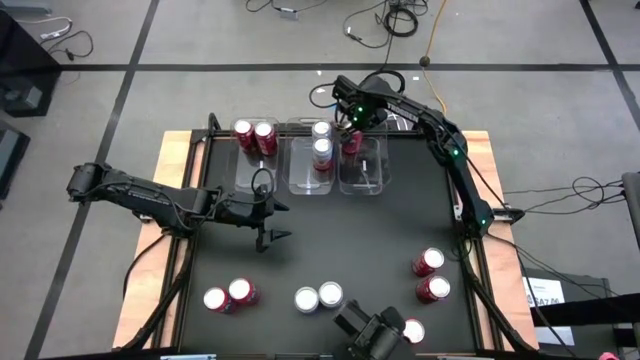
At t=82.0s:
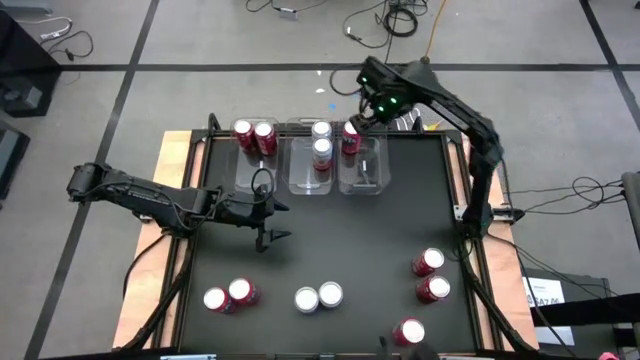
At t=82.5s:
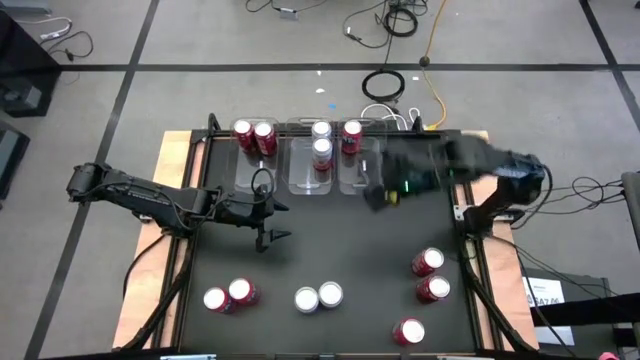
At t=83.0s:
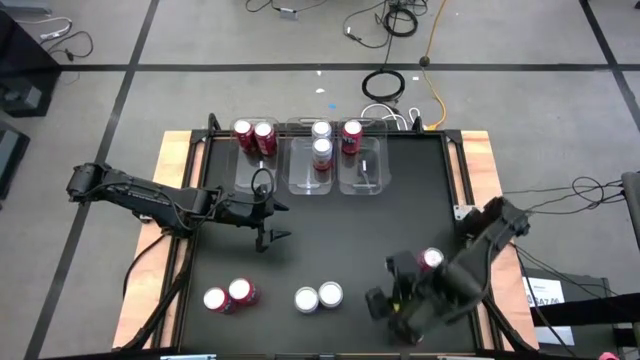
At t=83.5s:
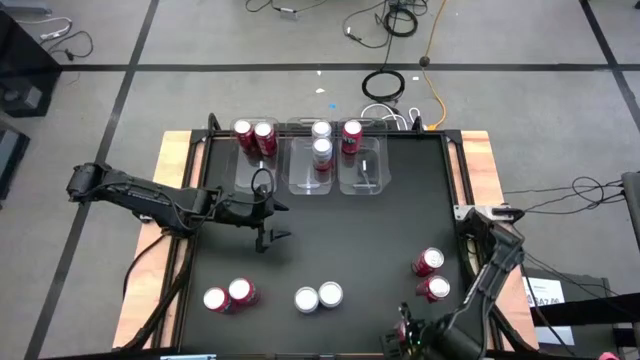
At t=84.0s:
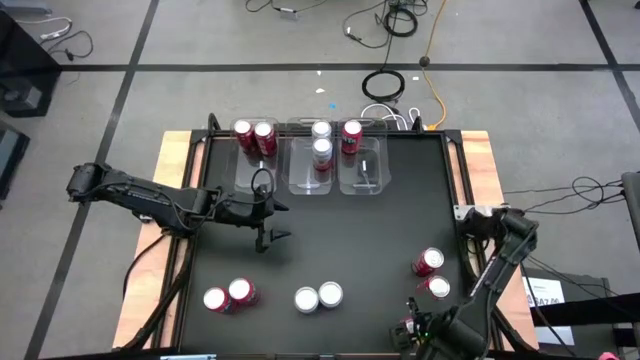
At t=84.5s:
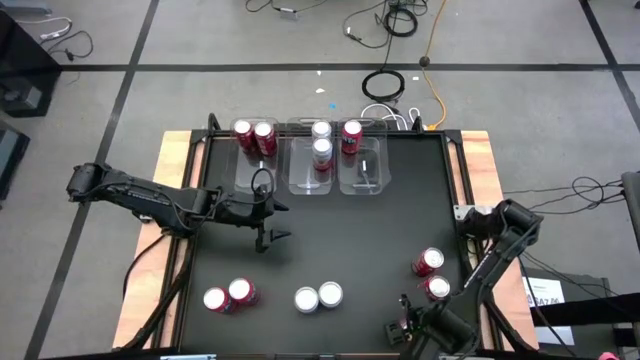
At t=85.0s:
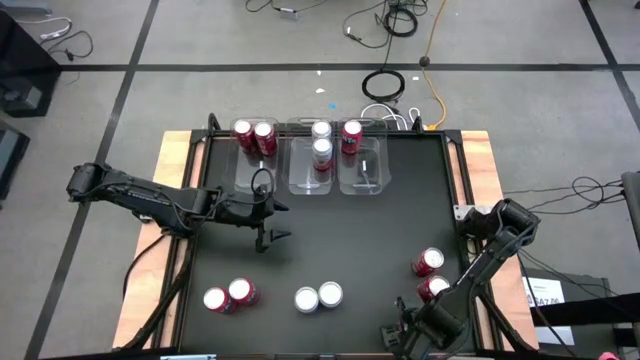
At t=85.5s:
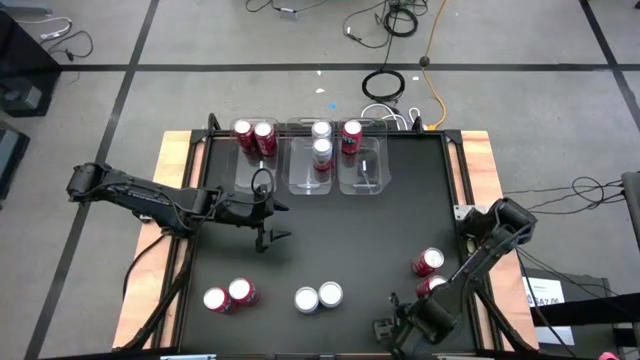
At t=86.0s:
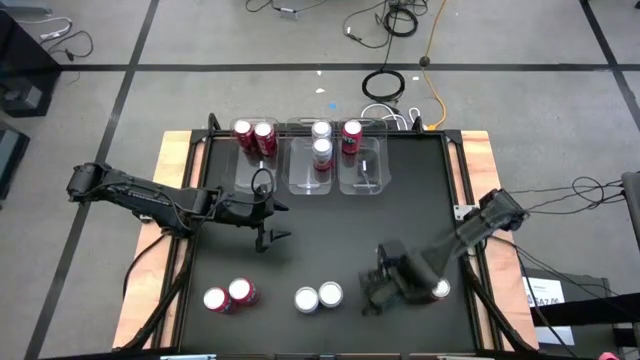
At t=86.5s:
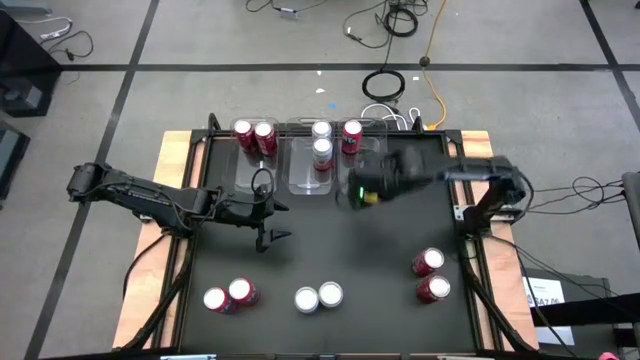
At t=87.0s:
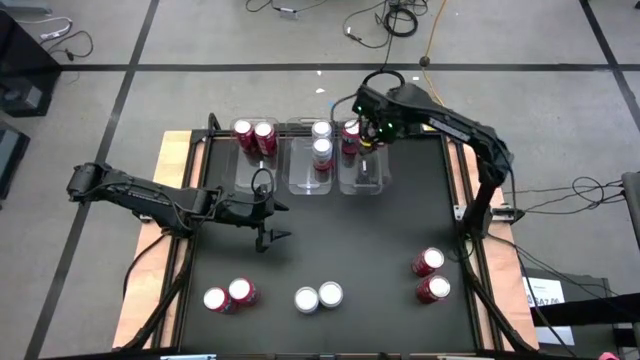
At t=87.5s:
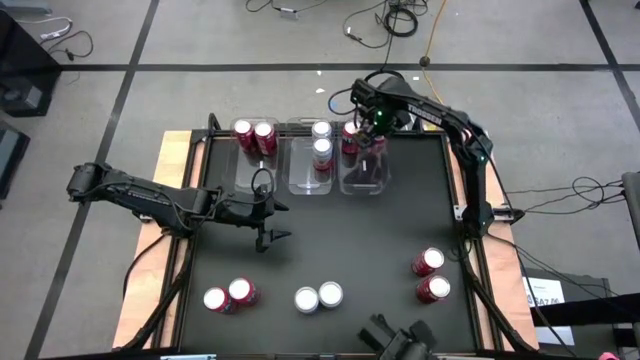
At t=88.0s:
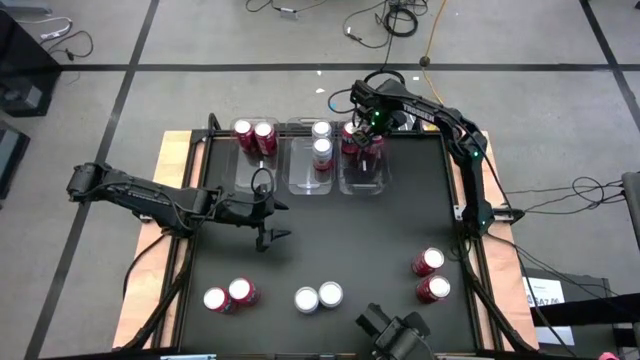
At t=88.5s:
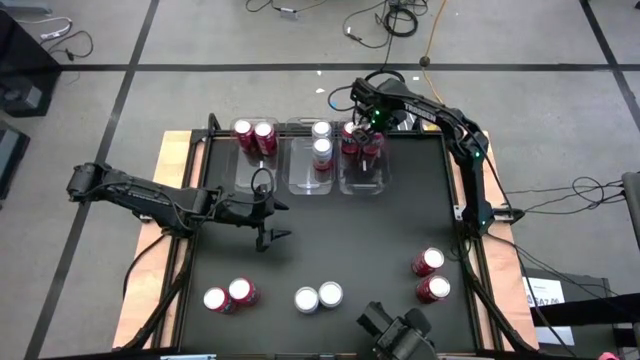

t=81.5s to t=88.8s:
Task: Sort soda cans
Put the right orange soda can into the right transparent bin

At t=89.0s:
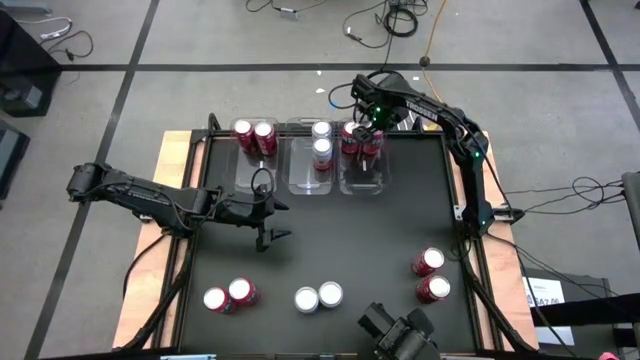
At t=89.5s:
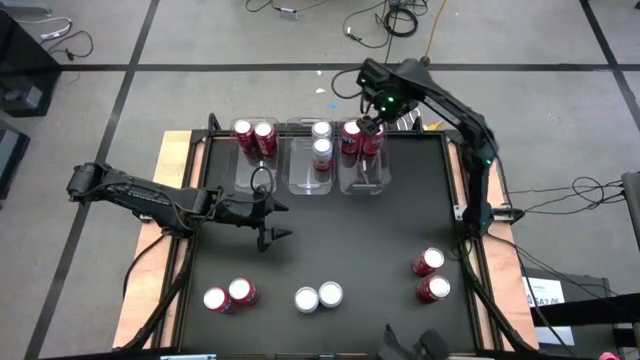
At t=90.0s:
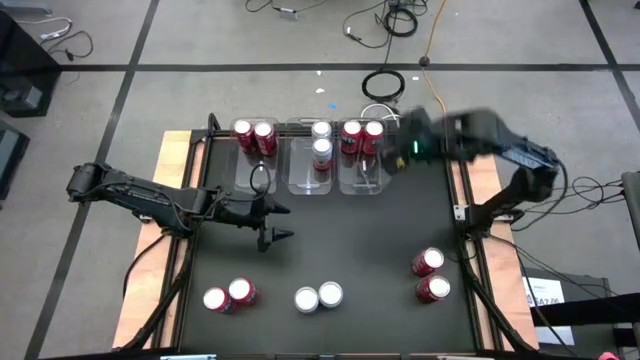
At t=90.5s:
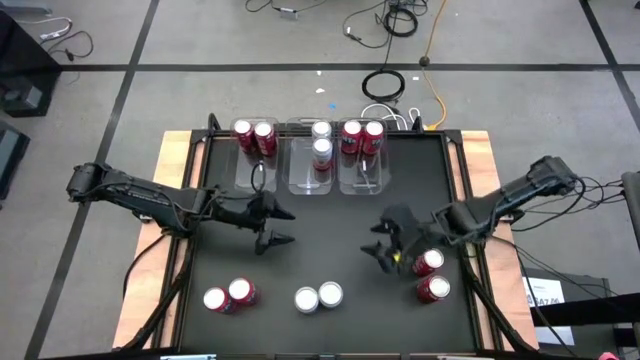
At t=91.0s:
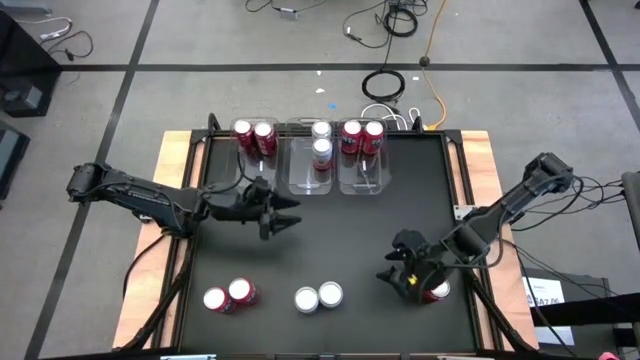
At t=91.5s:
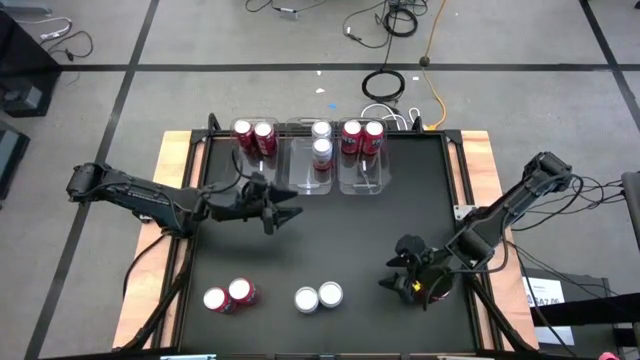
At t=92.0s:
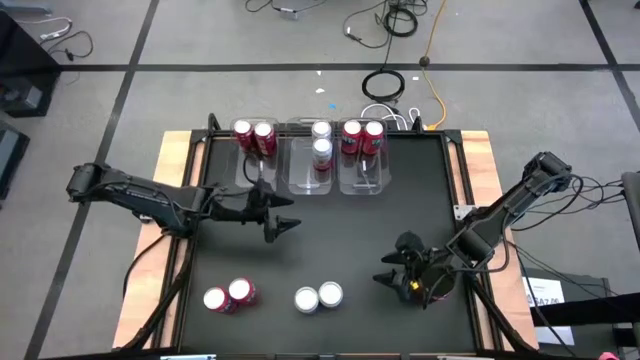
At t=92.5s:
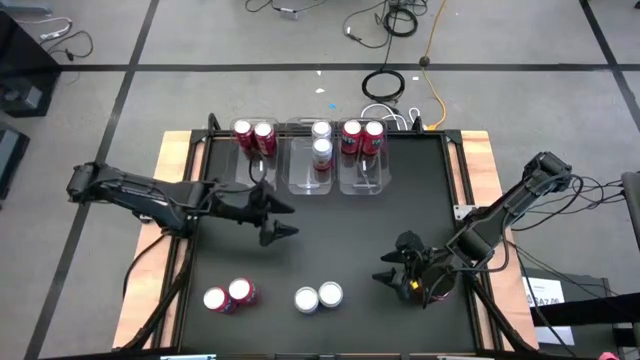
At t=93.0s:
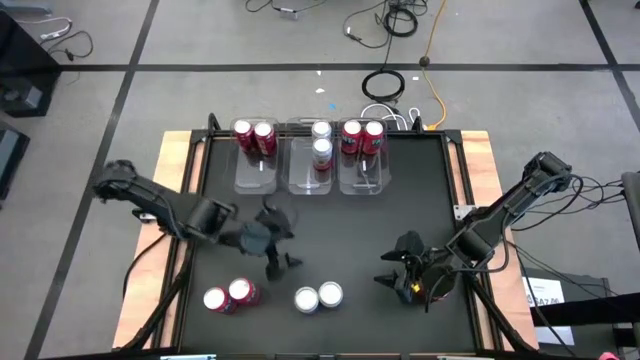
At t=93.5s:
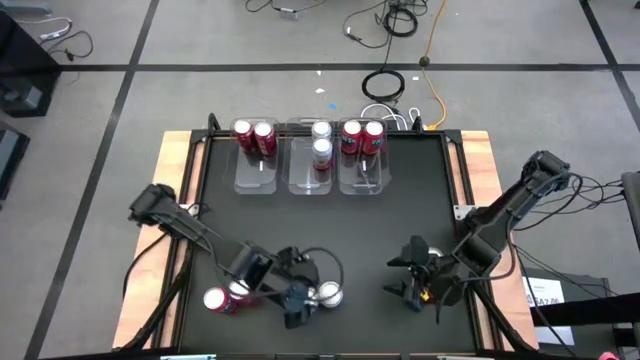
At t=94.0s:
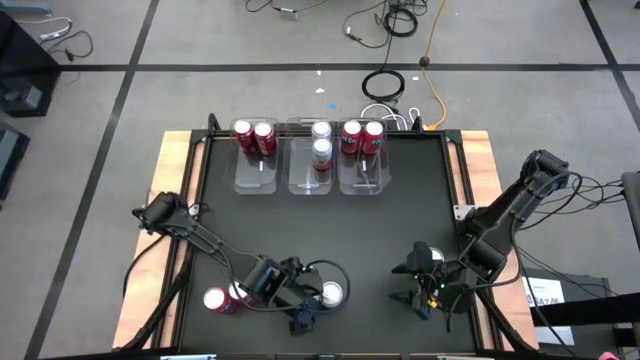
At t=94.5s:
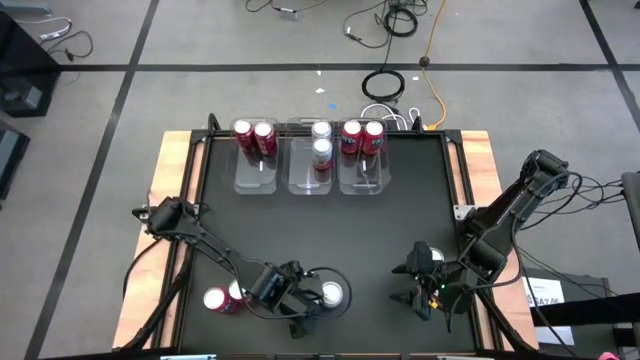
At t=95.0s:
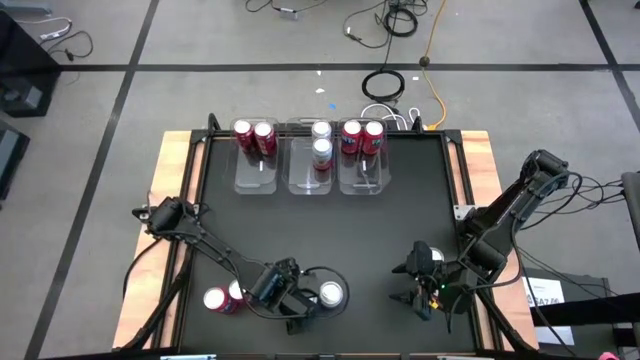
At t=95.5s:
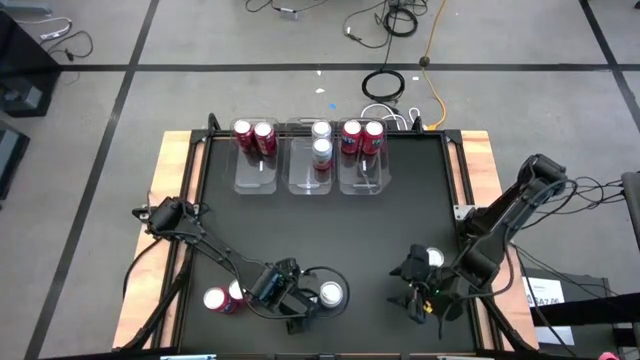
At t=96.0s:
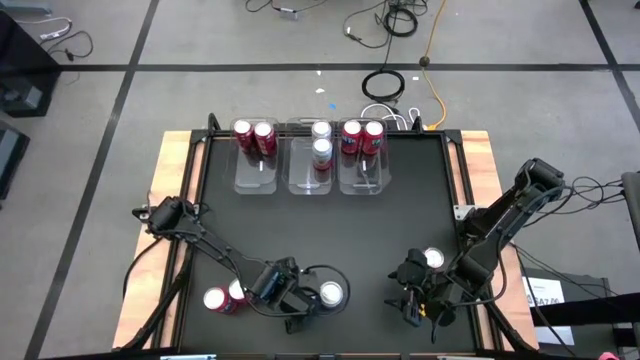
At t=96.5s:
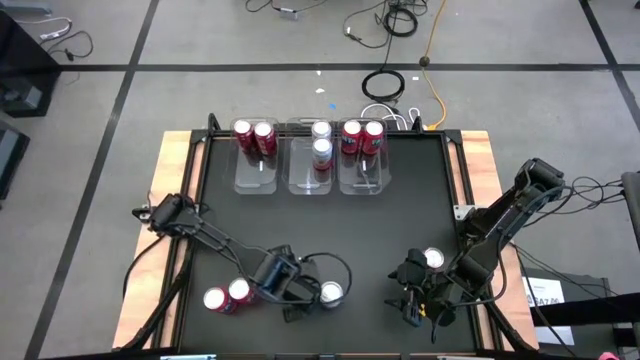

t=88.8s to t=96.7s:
Put the right orange soda can into the right transparent bin

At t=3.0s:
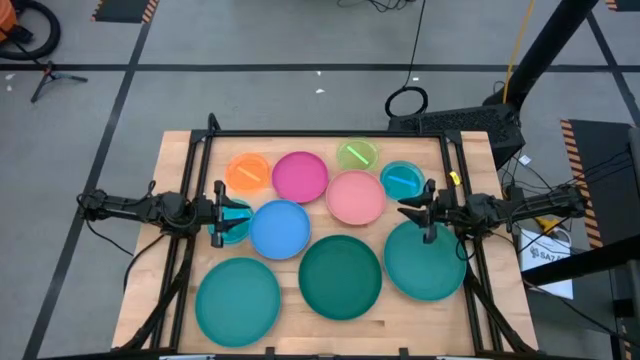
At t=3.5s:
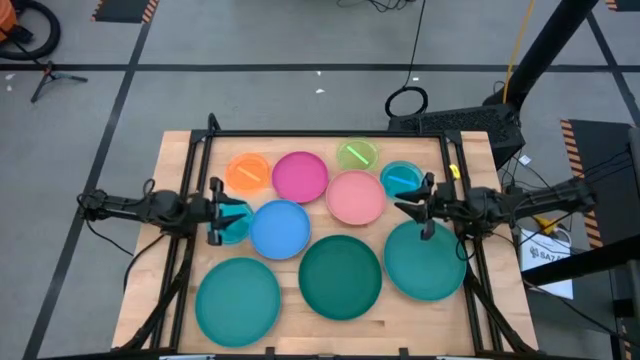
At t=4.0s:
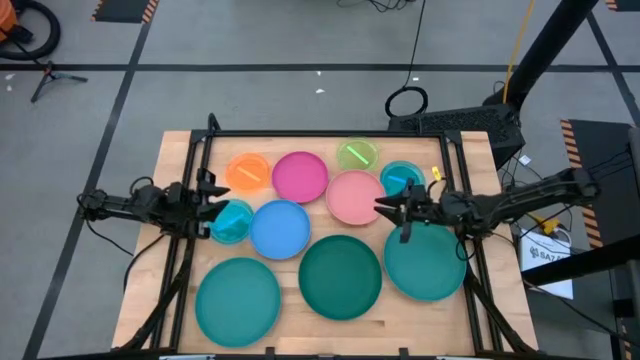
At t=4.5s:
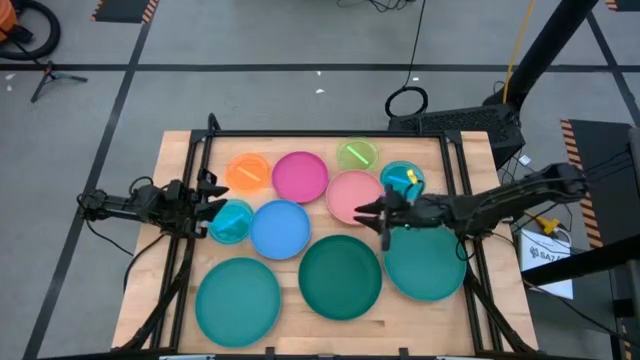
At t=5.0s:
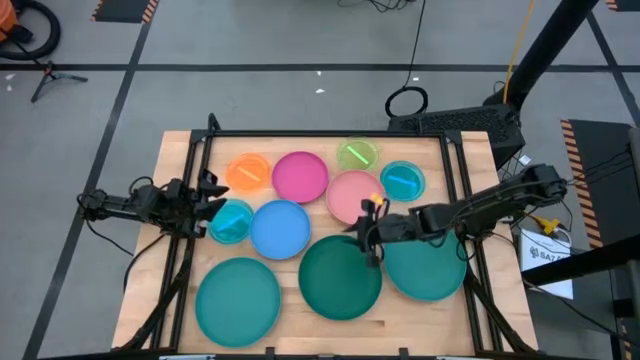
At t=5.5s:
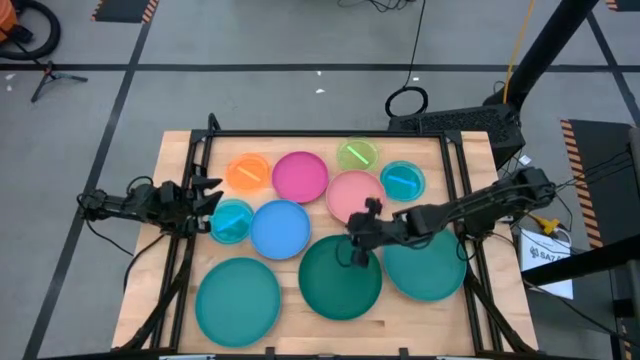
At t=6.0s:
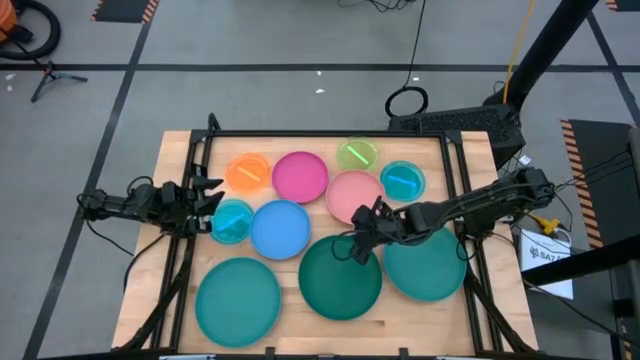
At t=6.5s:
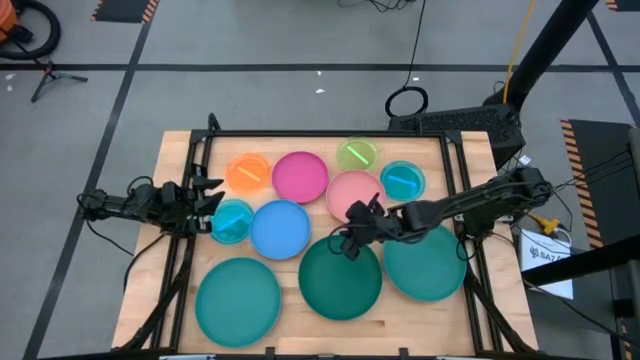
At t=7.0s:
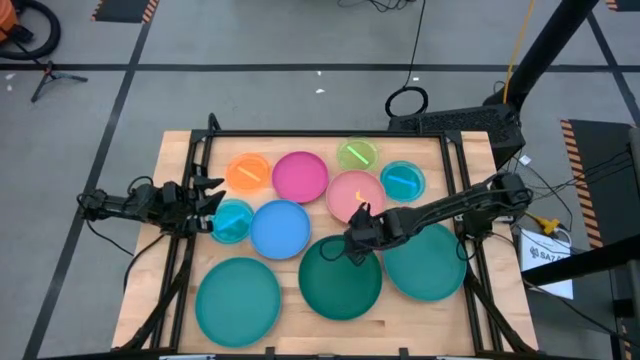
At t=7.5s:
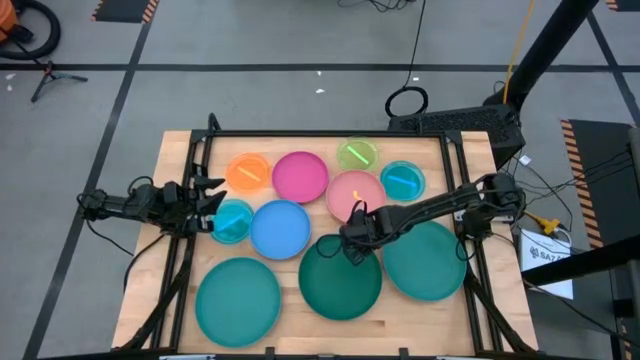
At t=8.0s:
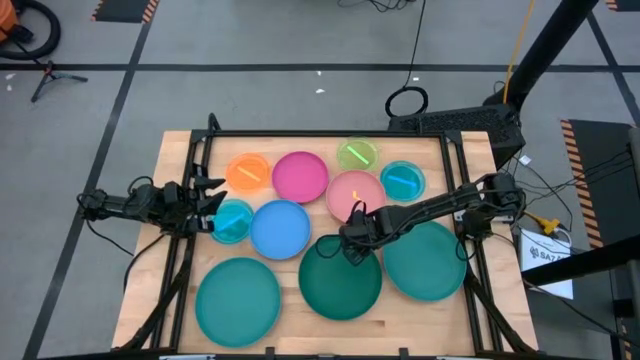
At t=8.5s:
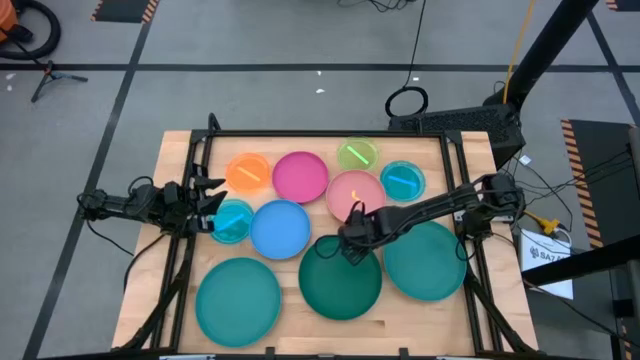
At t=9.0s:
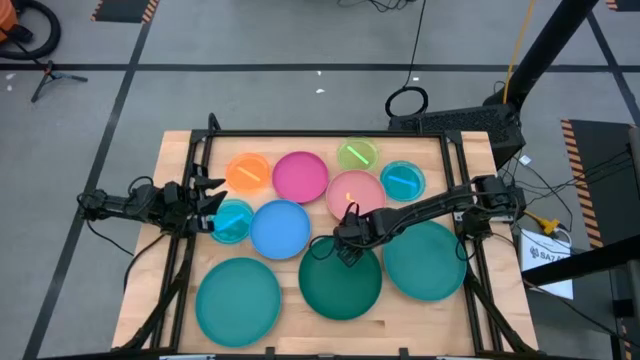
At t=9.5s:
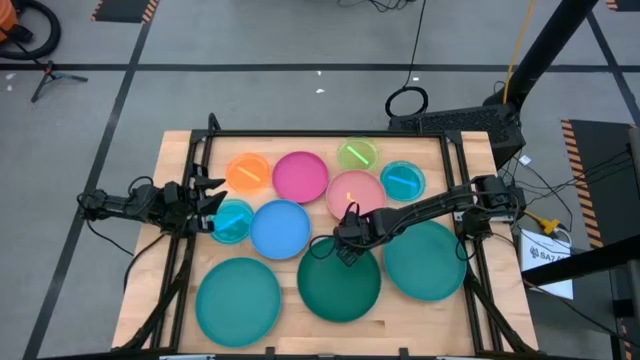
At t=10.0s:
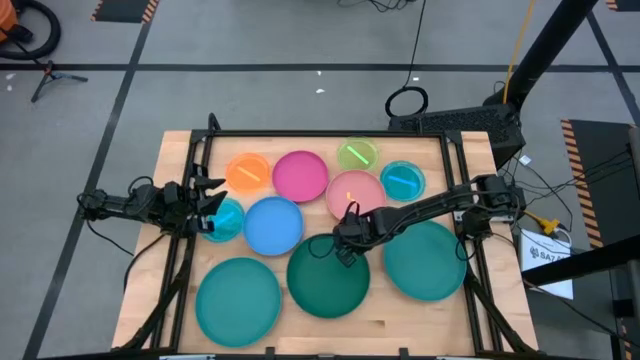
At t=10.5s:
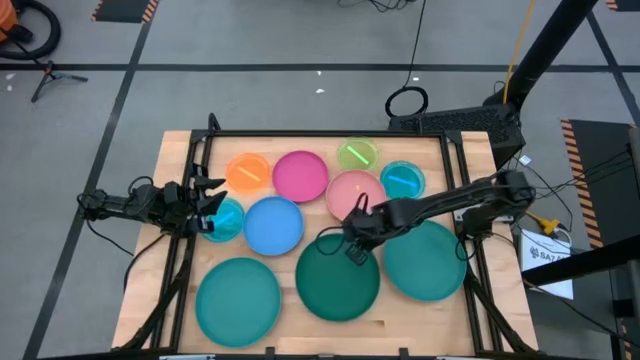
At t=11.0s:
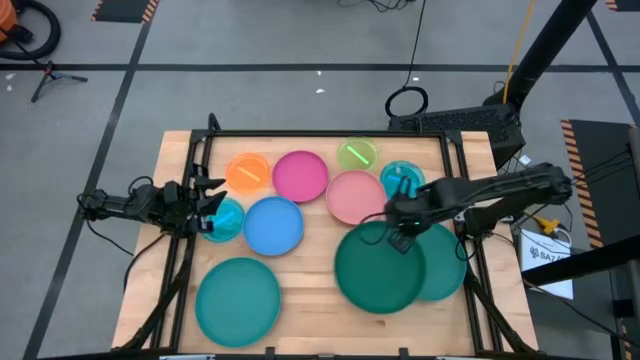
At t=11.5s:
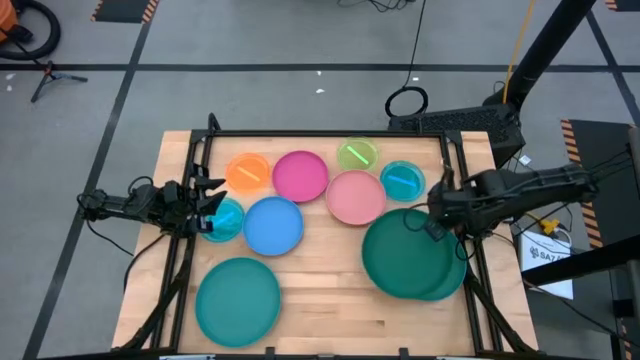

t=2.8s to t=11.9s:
Task: Stack plastic plates
Stack the dark green plate on top of the right green plate
